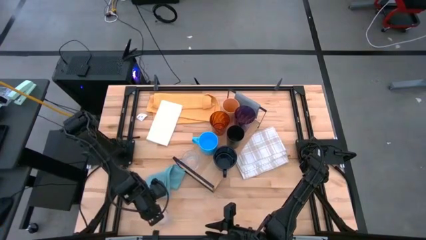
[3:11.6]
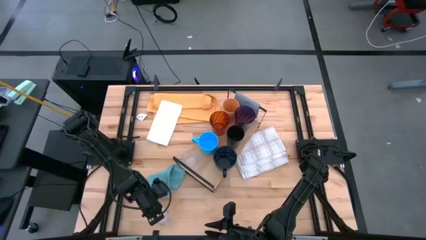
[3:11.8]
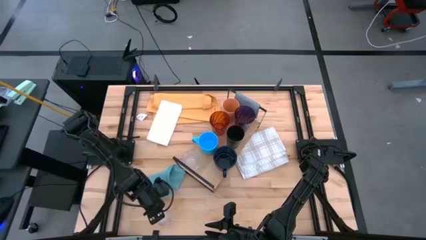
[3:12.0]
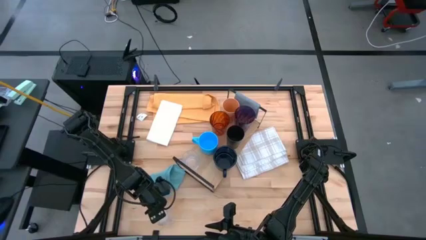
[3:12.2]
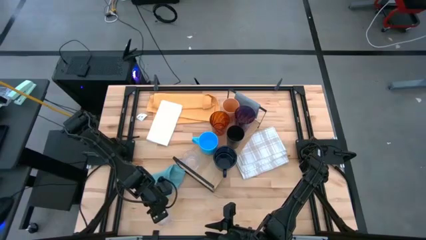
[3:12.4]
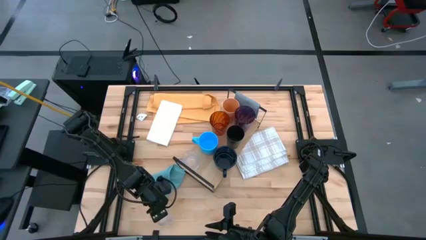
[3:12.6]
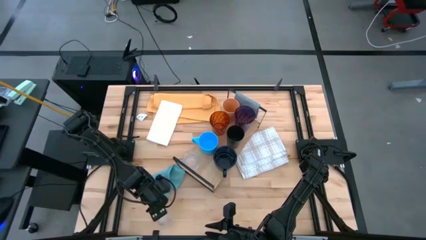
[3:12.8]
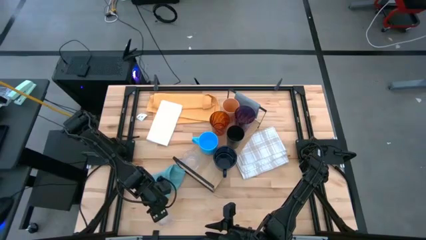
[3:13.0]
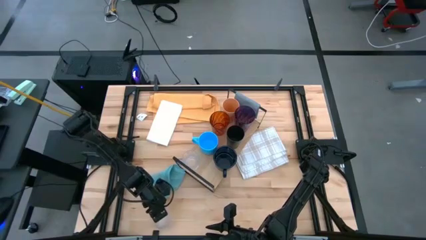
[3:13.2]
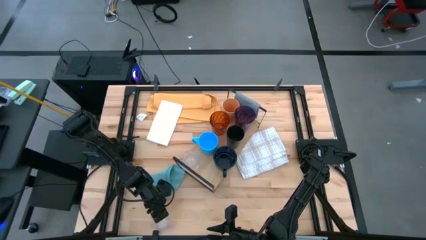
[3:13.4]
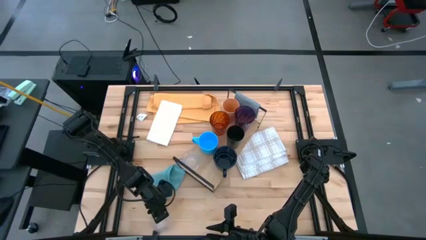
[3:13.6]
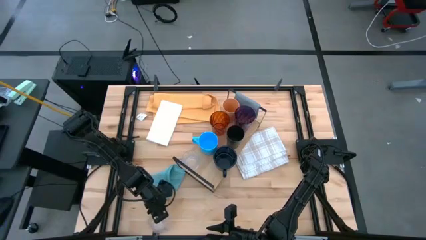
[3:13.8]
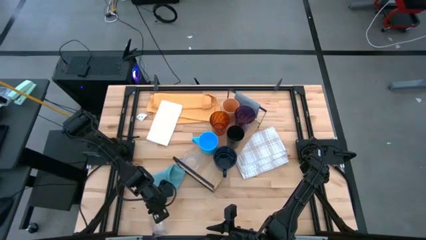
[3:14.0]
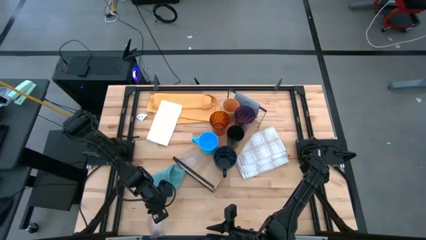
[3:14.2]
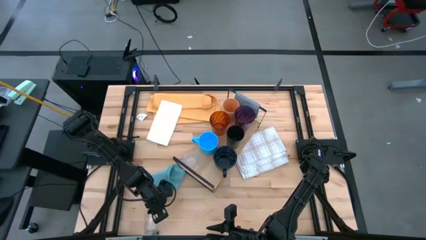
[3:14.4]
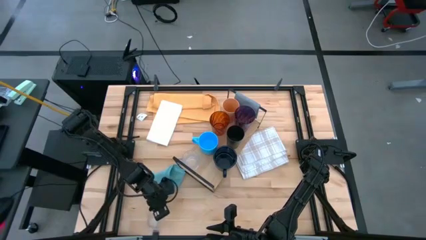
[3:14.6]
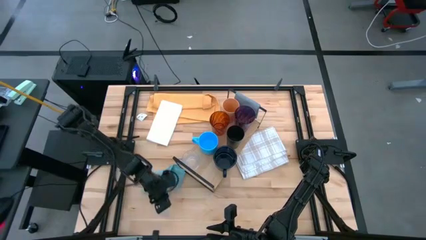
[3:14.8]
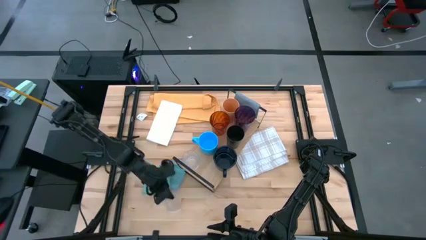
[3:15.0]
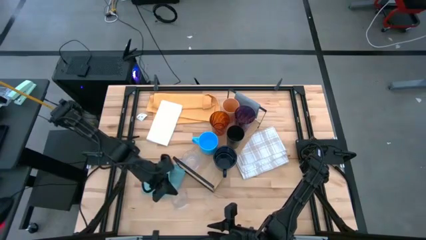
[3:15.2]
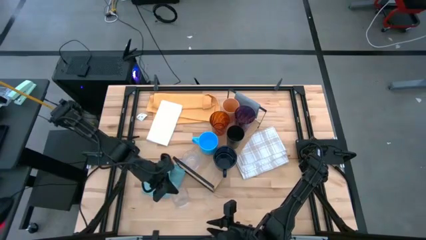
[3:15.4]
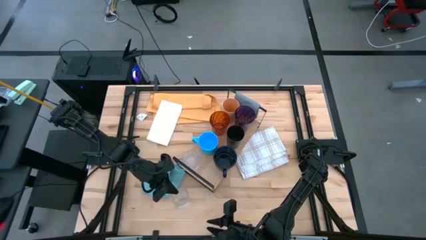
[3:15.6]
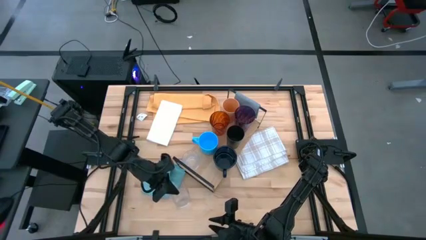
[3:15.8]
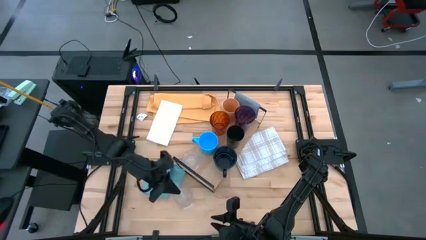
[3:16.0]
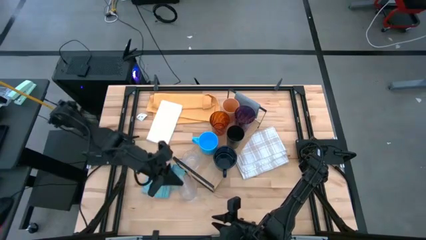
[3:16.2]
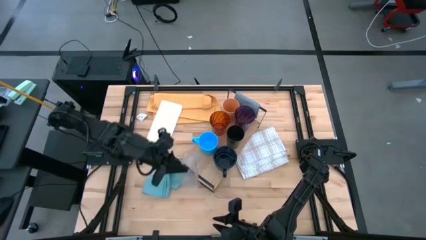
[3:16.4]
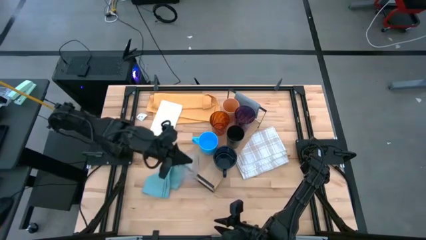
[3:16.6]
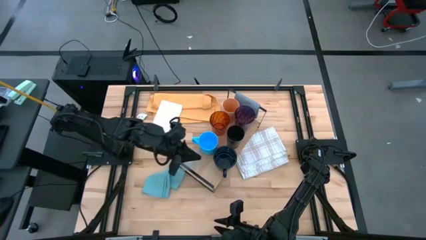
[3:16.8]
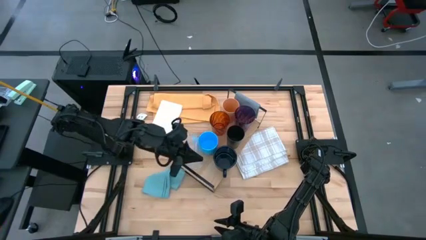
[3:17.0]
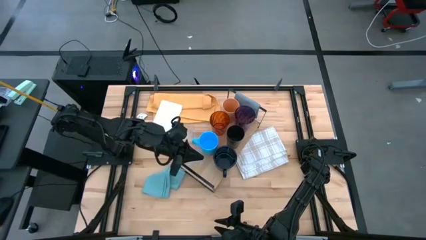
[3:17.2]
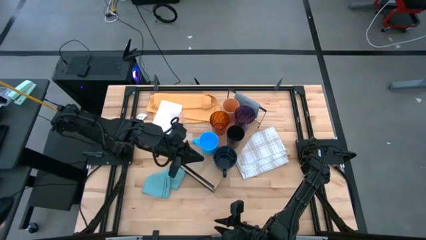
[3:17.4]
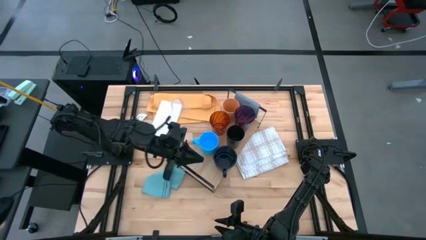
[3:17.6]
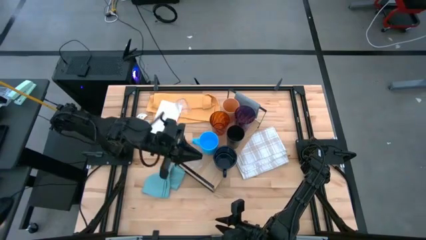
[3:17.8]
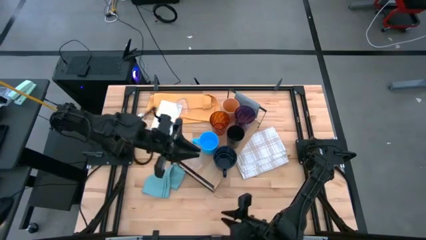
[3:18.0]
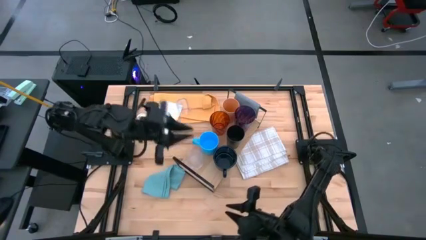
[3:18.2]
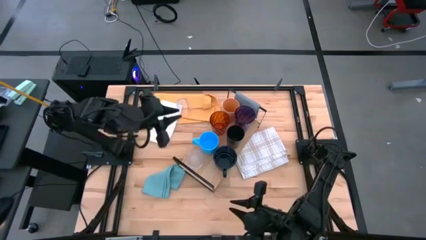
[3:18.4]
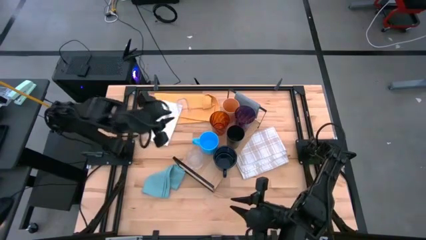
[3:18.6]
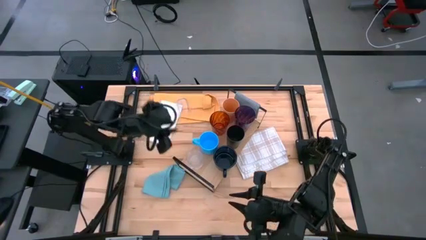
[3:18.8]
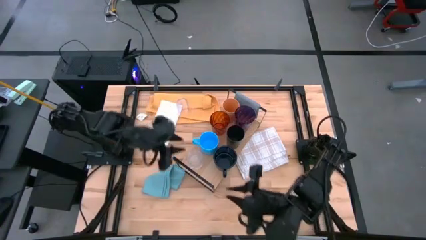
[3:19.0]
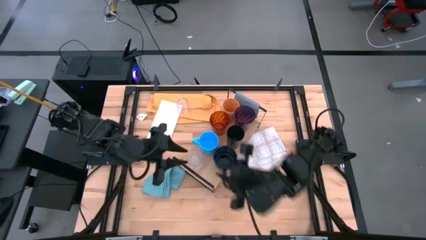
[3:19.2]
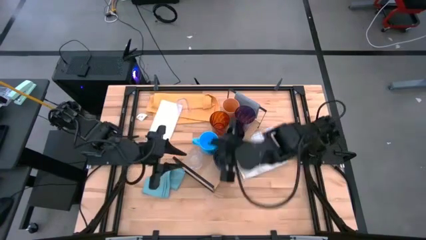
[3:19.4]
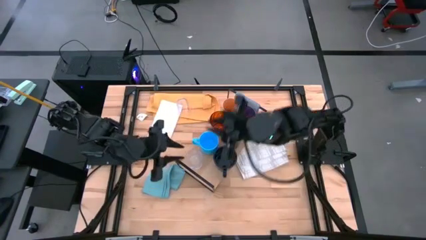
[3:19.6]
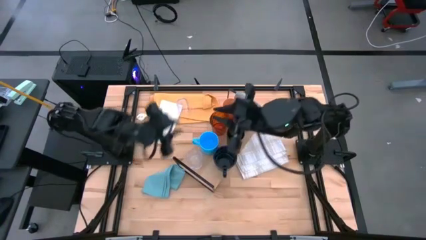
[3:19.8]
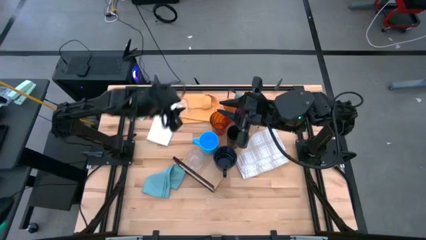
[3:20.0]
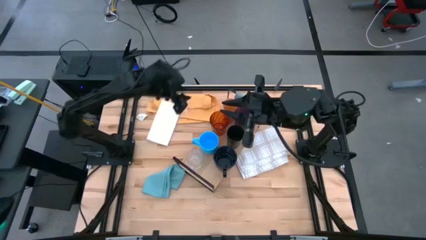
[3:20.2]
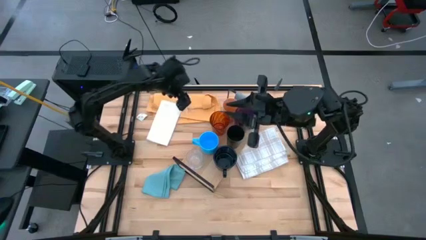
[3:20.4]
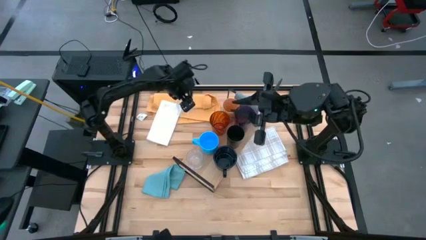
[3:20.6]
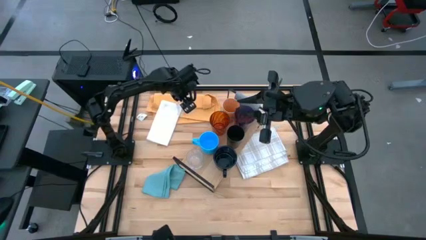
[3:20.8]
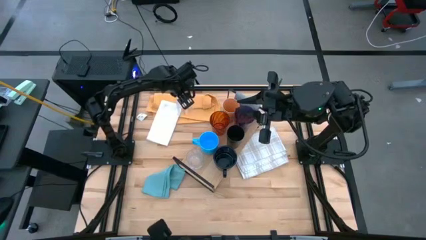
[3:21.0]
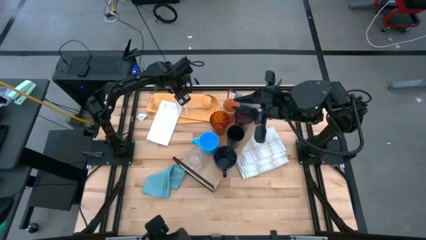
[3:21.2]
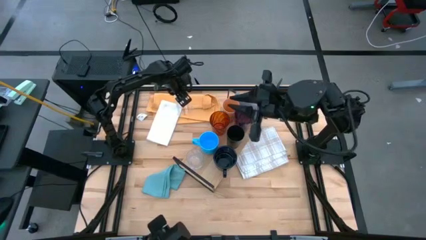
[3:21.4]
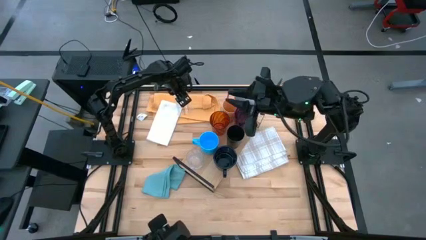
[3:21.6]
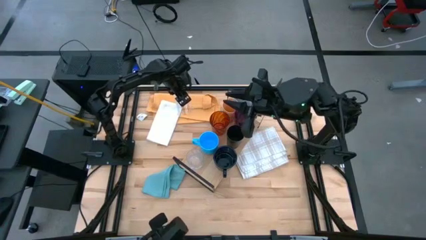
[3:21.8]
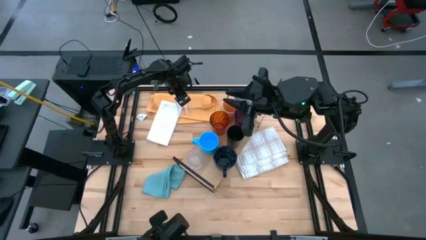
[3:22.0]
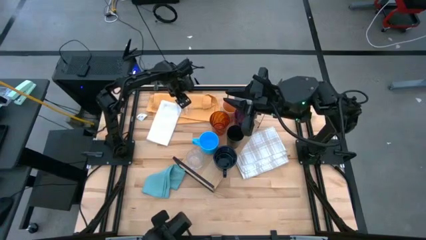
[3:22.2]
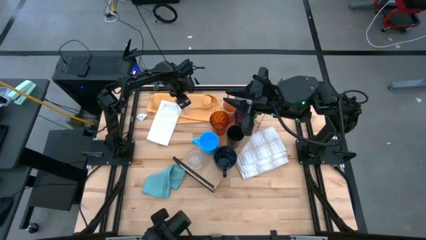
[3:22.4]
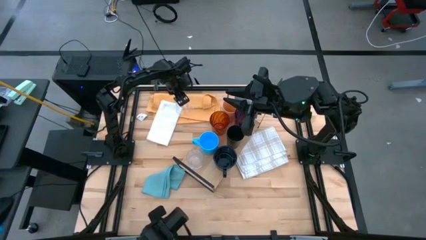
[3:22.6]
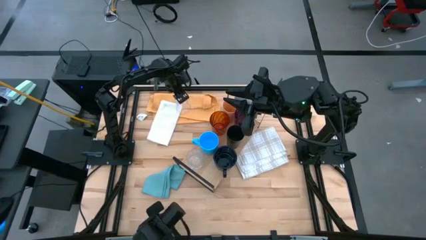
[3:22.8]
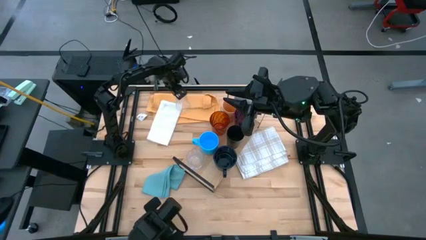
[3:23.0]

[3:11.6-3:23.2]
Task: Stack small to large cups/mugs on shelf
Put the transparent mug on the shelf

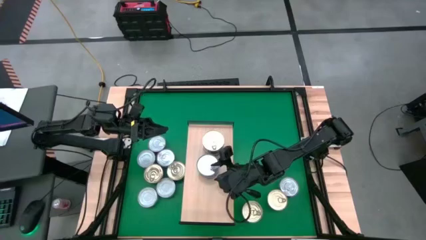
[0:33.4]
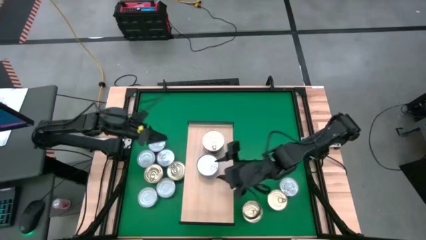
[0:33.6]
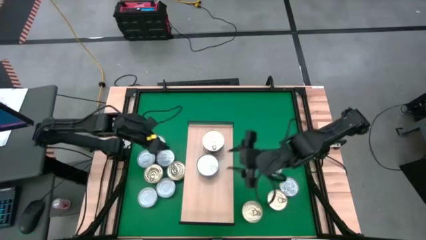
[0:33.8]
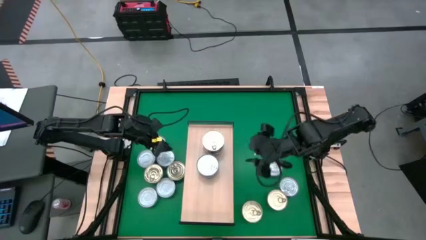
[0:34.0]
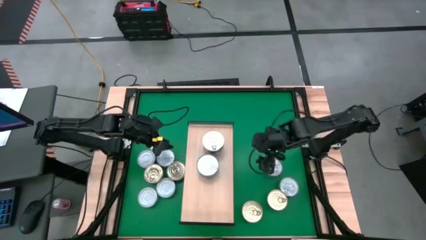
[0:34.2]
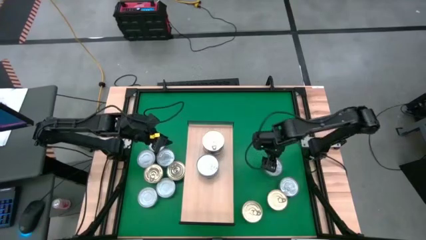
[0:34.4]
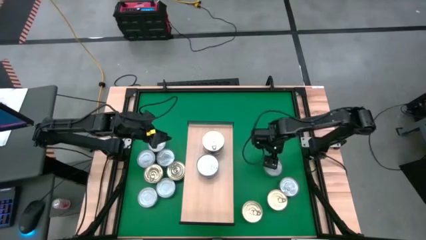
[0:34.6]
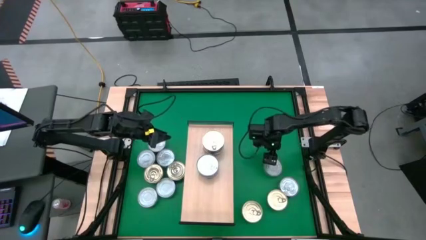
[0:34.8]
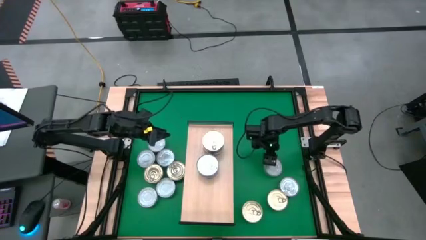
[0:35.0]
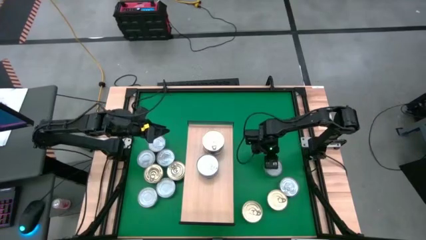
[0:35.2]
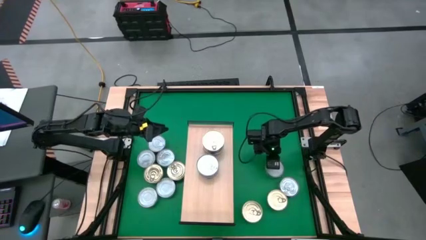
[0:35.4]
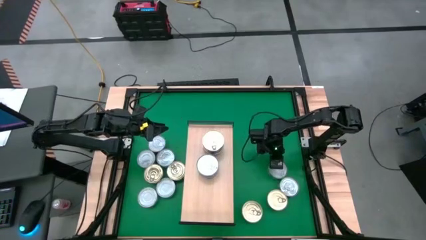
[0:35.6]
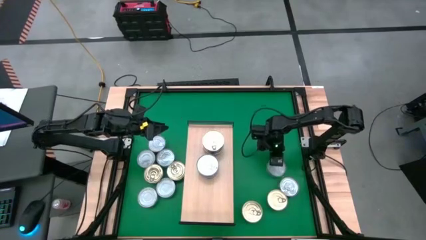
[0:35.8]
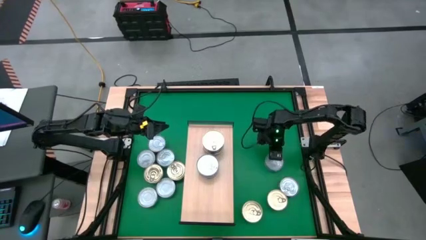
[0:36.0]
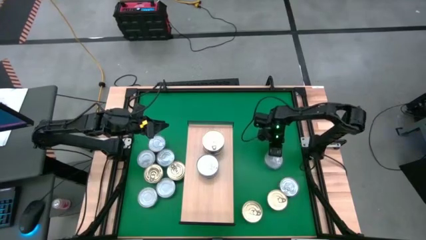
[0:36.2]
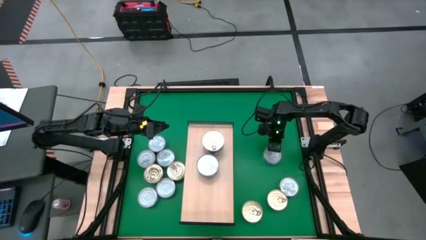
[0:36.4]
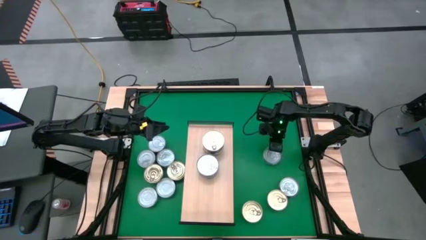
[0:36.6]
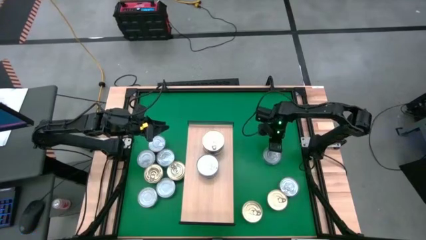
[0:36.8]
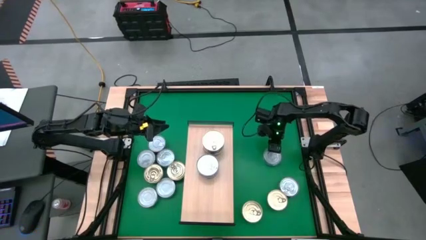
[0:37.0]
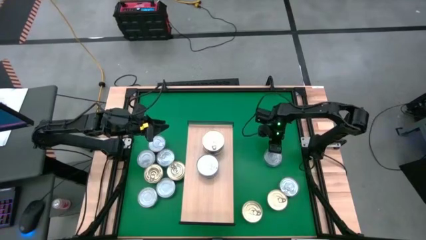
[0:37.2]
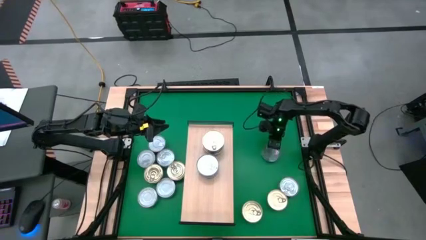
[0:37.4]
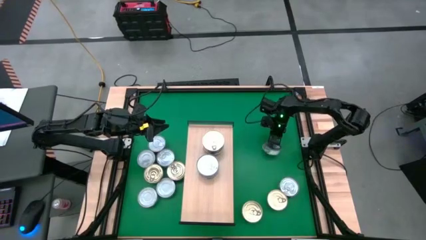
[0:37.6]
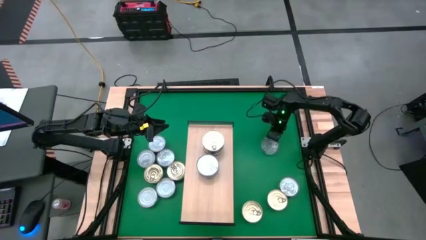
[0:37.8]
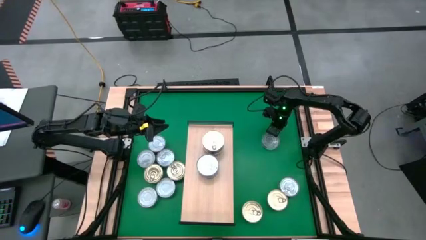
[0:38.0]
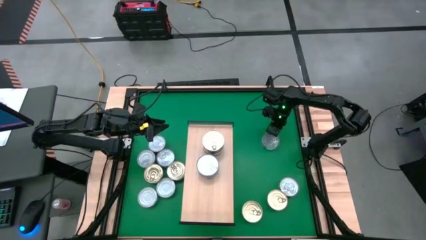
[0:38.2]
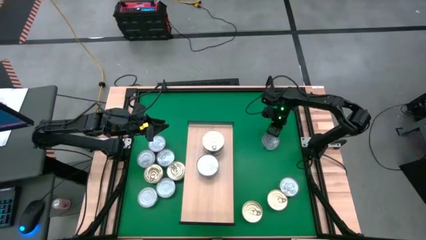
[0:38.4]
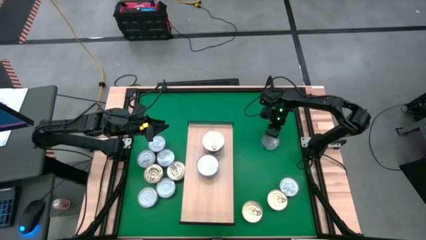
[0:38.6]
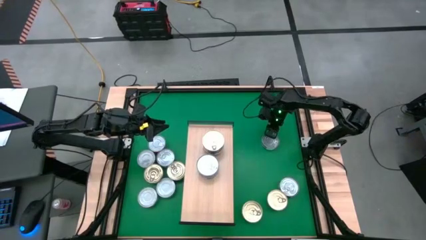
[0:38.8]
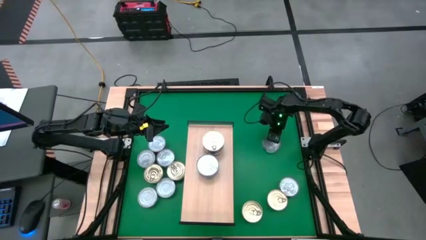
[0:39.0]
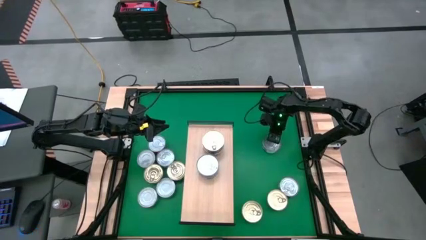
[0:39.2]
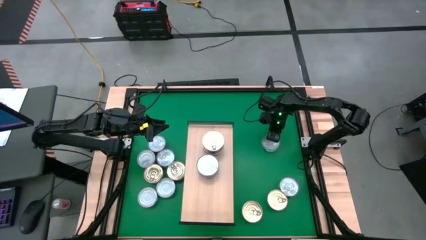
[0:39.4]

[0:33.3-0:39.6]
Task: Stack canned seafood by type on shelf
Stack the green tuna can on top of the blue tuna cans on the shelf
